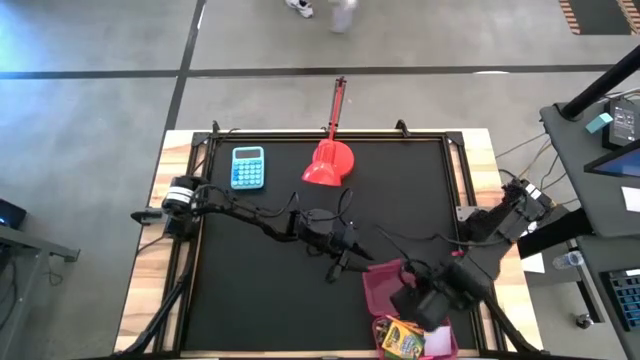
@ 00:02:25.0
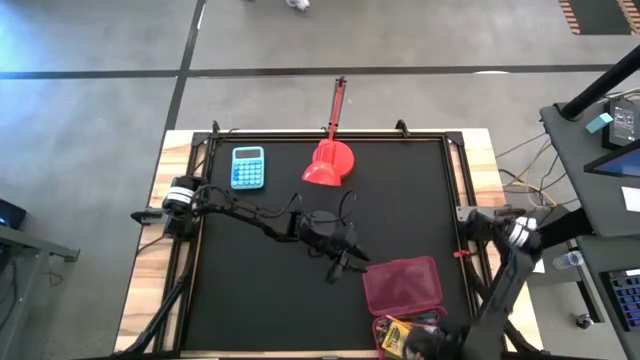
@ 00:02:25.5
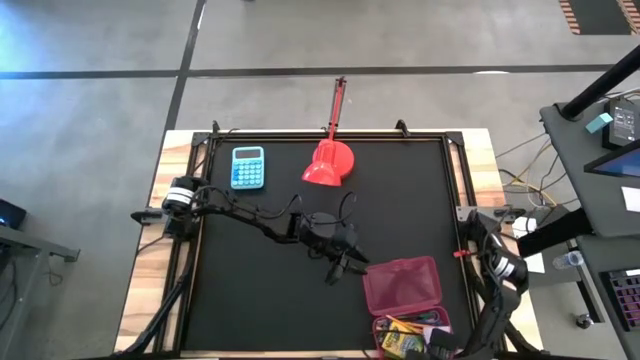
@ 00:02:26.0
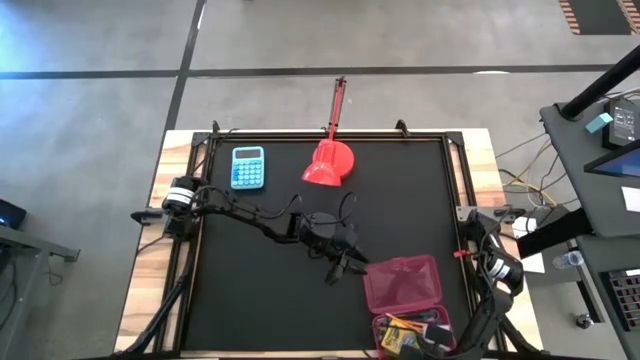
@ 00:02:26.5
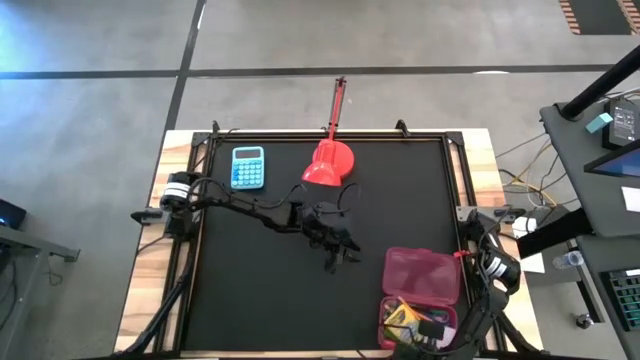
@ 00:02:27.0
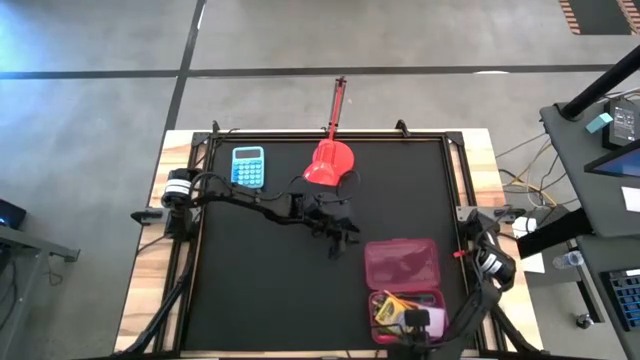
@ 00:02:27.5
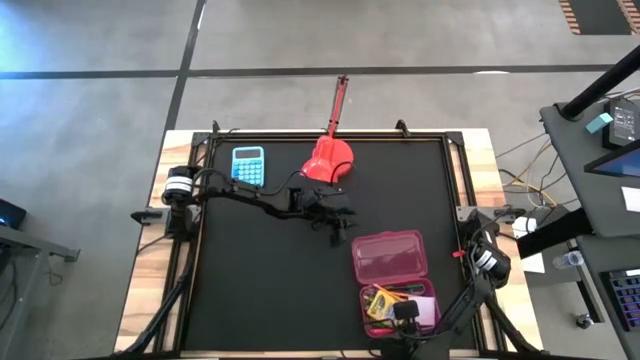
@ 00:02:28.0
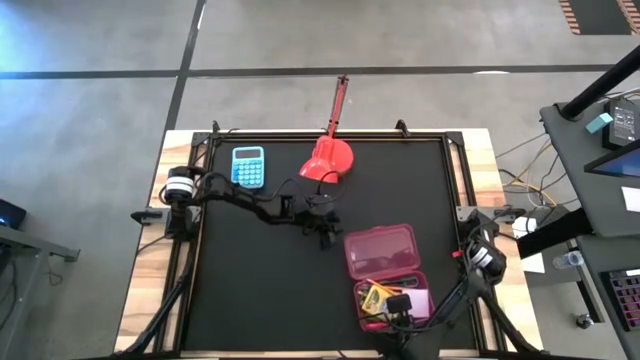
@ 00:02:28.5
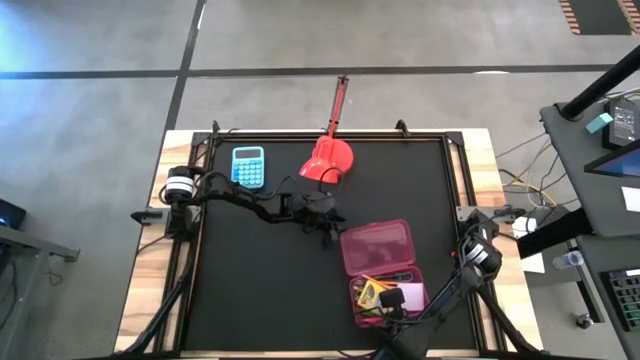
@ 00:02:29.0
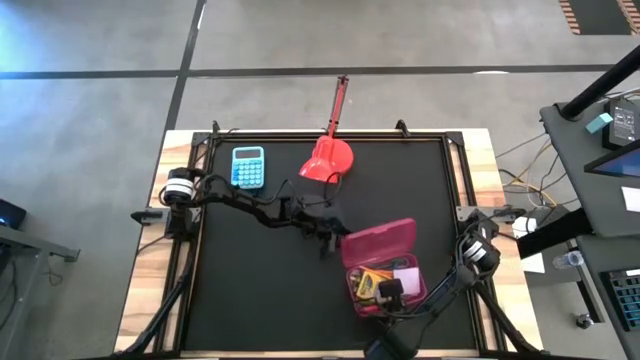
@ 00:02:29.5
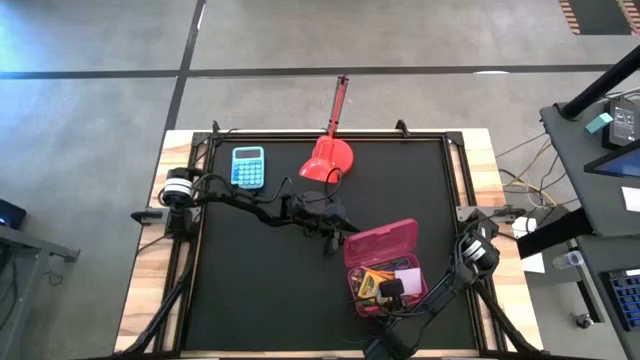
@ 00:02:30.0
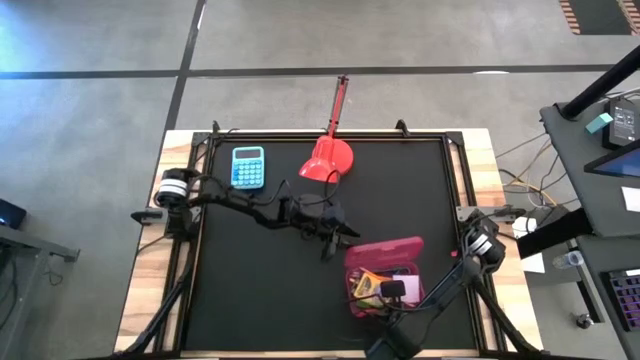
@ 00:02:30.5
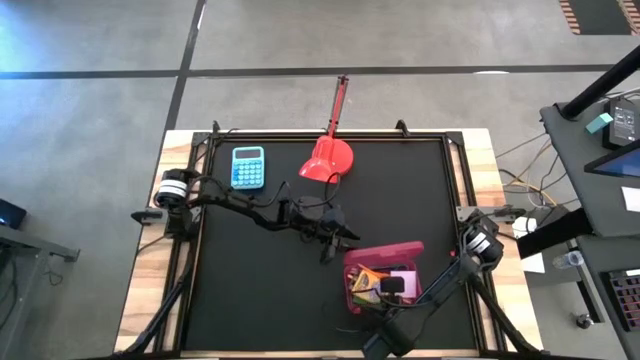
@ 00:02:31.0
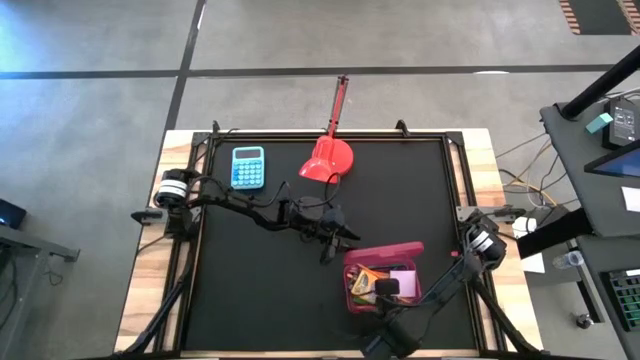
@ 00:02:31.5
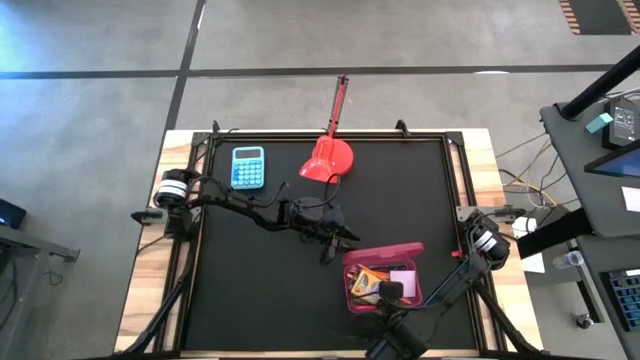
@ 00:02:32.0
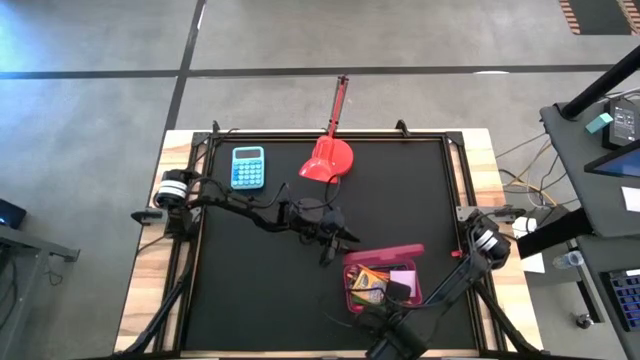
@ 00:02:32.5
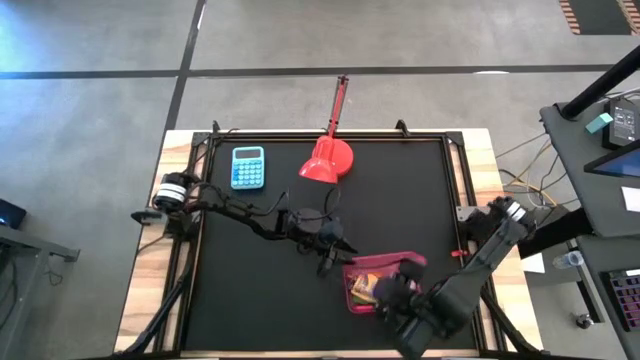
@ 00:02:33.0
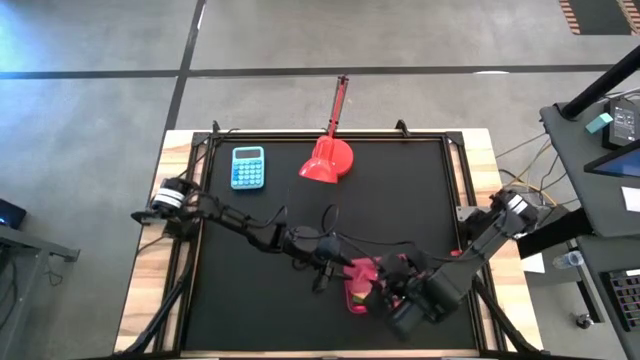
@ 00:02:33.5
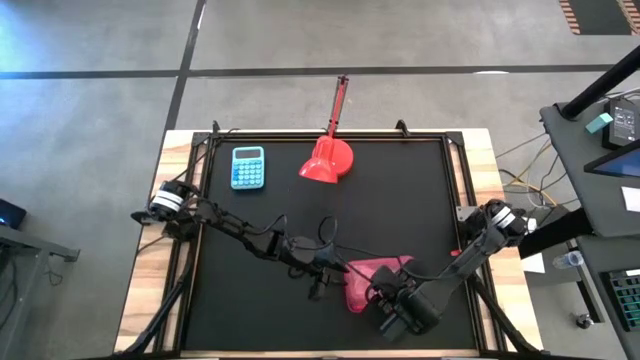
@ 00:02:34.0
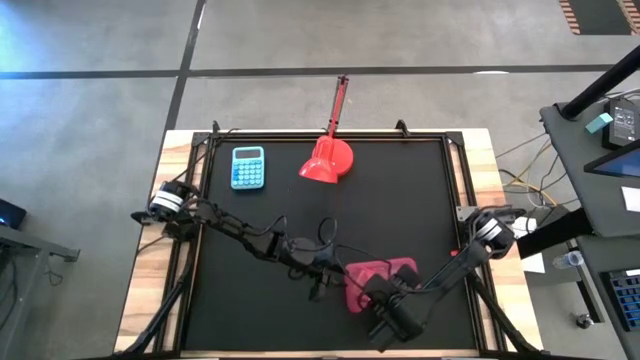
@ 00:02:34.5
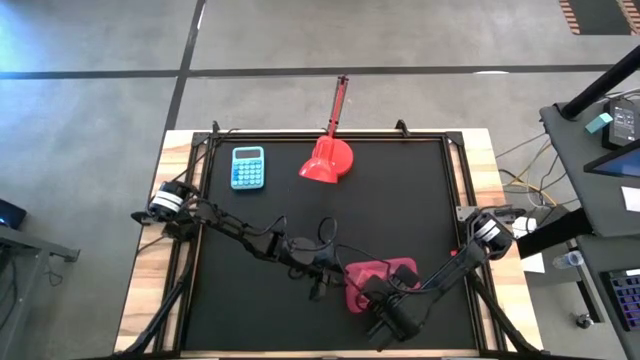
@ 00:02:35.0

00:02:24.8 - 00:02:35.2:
Task: Pack school essentials
Close the pink supply box

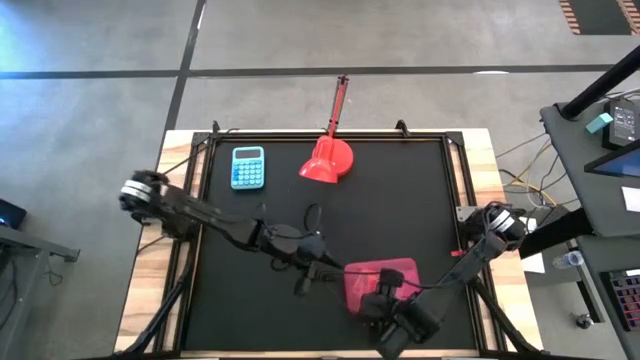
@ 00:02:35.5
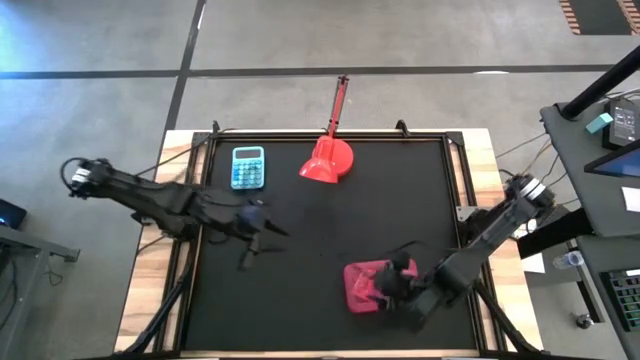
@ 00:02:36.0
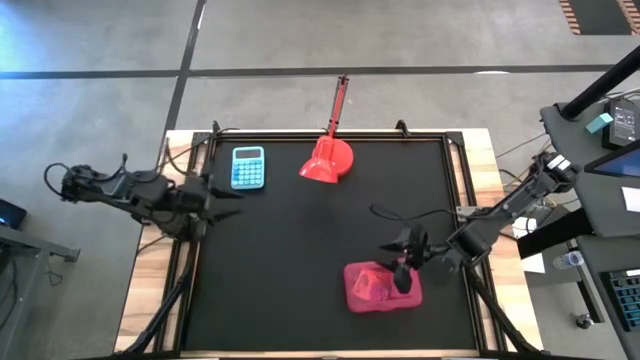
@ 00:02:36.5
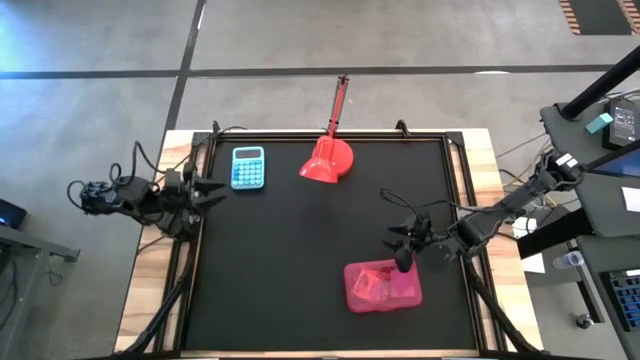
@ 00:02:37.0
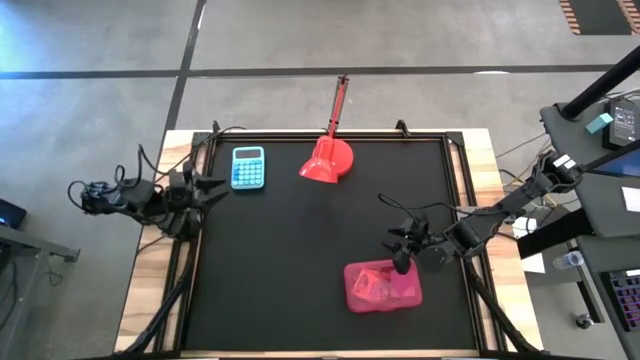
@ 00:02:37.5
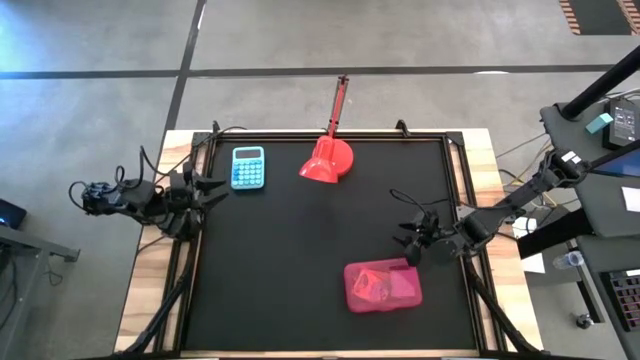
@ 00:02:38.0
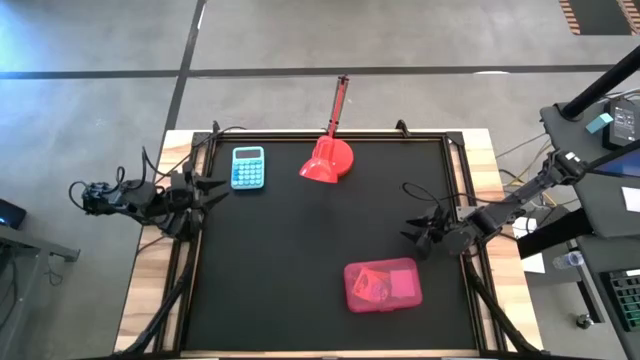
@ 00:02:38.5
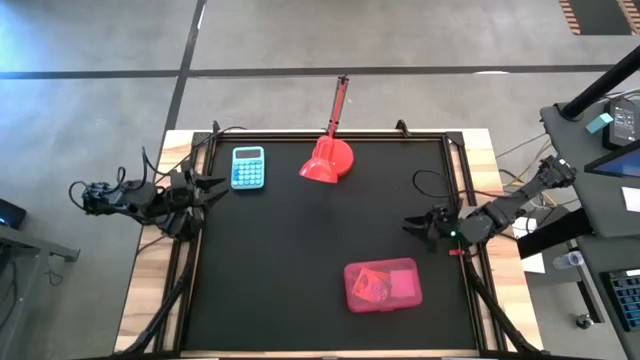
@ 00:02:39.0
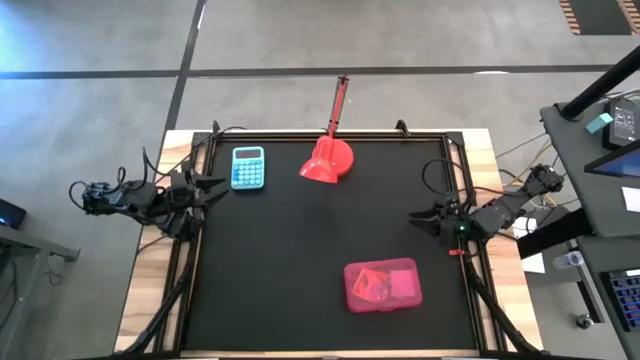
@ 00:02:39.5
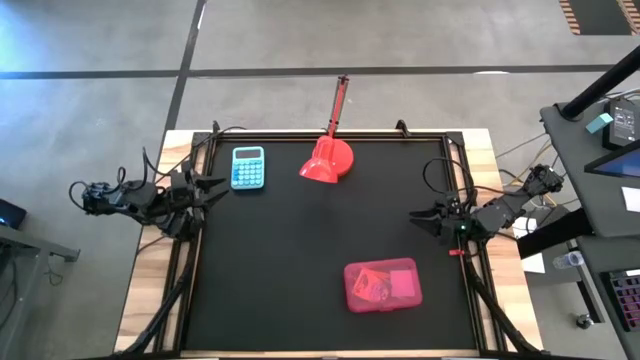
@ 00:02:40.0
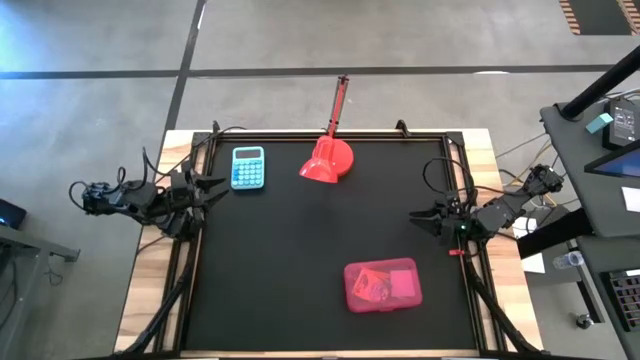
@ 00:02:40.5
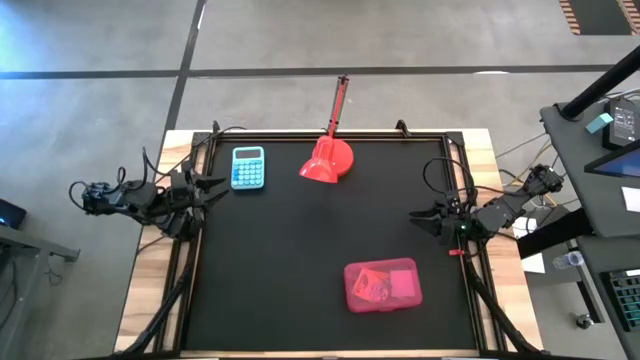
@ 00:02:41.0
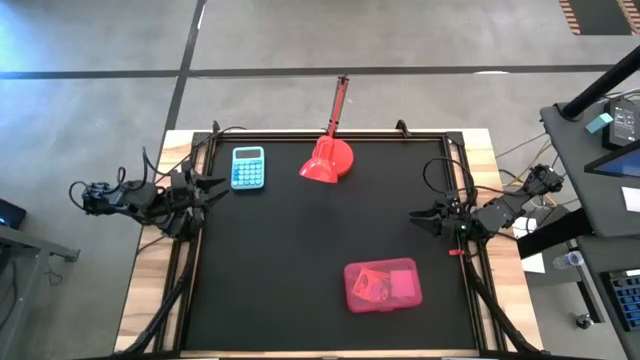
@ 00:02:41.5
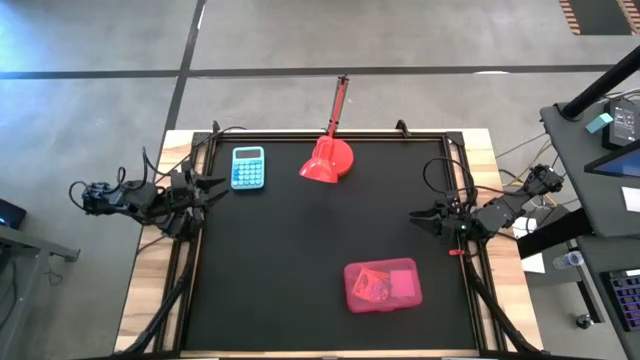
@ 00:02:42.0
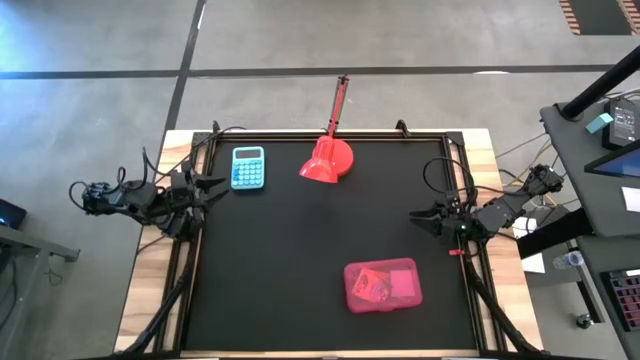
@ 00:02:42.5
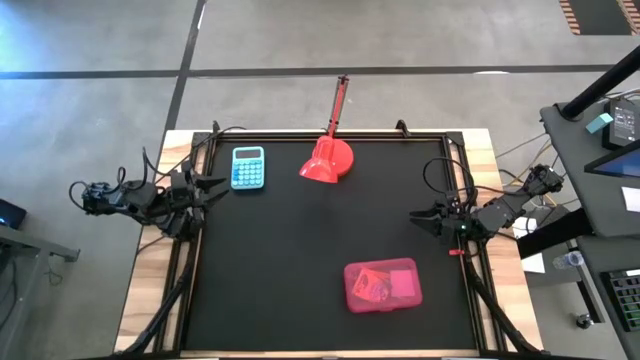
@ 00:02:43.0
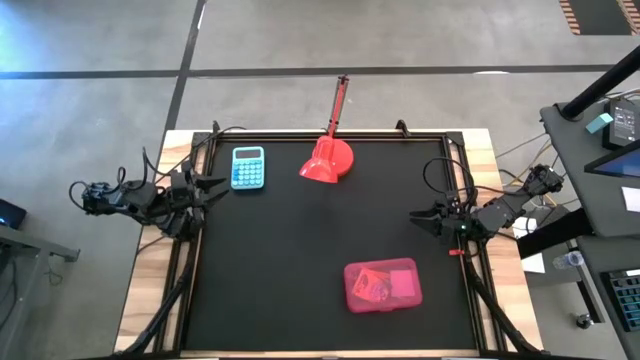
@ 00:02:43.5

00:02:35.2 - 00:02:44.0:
Return to Home Position

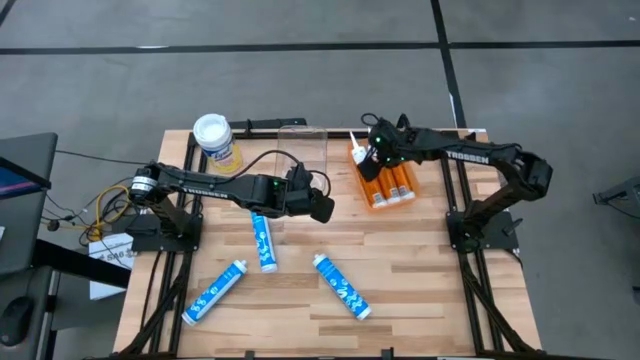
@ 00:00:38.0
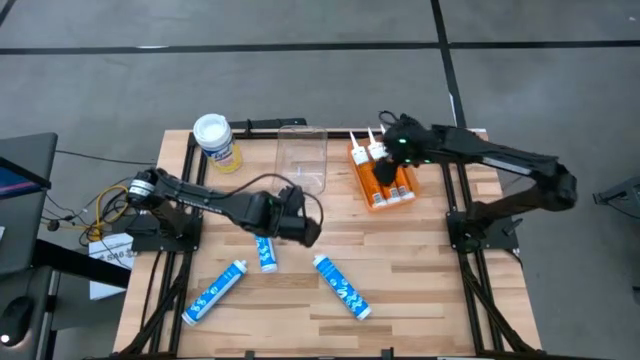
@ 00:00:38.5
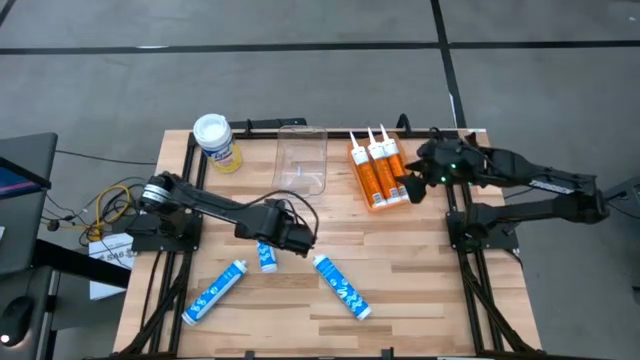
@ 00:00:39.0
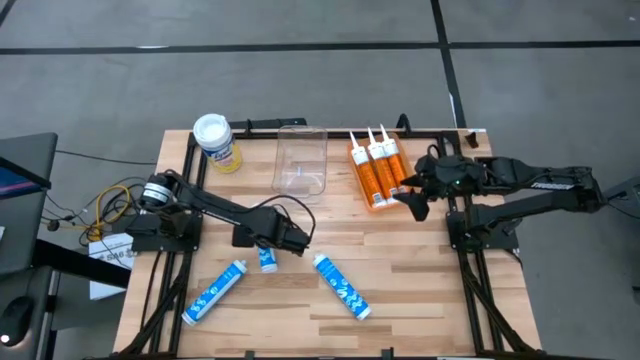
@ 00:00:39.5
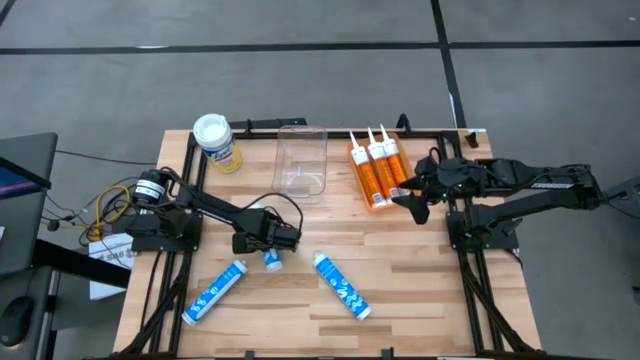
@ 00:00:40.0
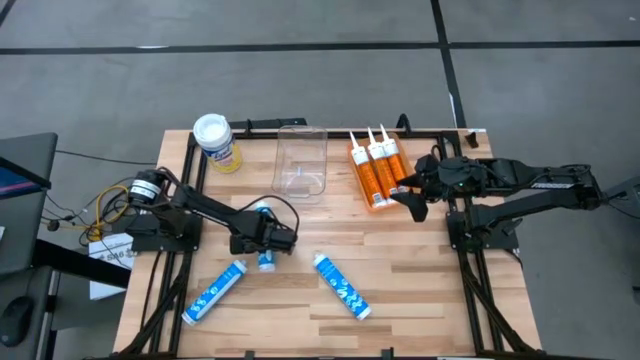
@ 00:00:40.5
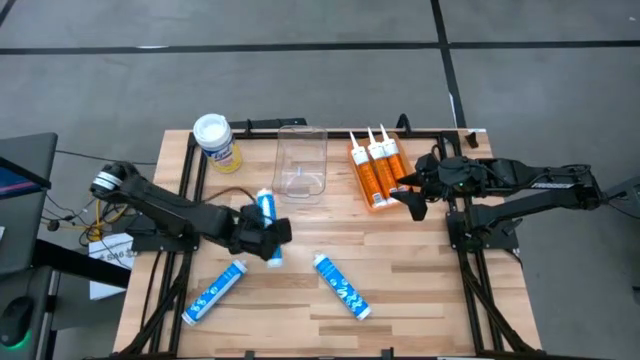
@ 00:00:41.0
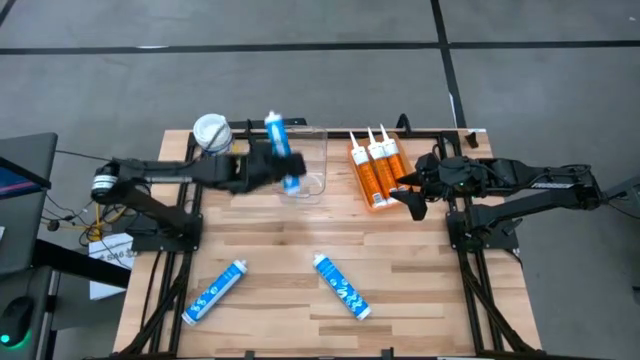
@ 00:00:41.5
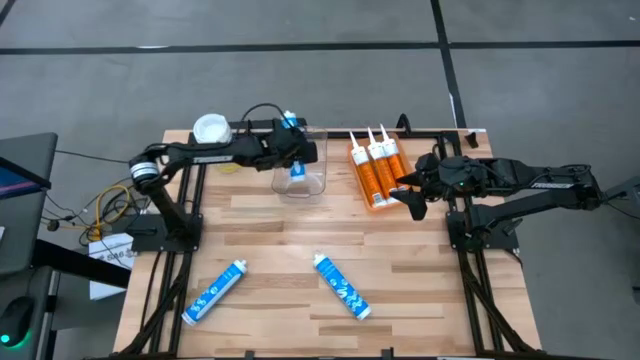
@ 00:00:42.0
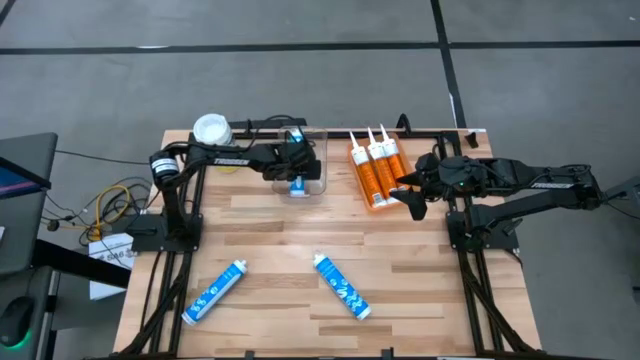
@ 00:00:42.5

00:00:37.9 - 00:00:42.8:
Task: Pick & place silicon tubes, Sealant and Lysol wipes
Put the top blue sealant into the transparent bin
